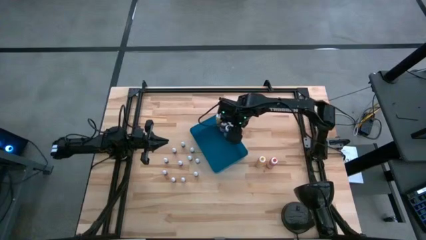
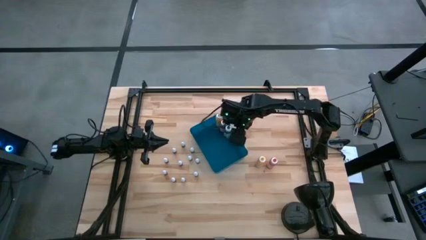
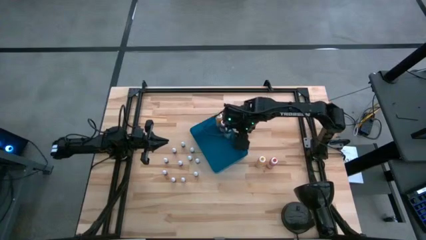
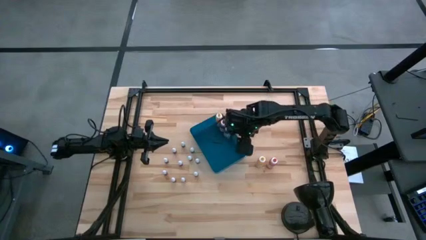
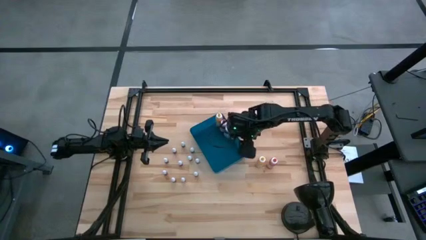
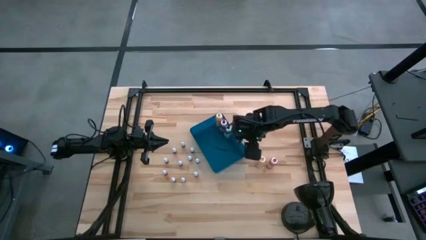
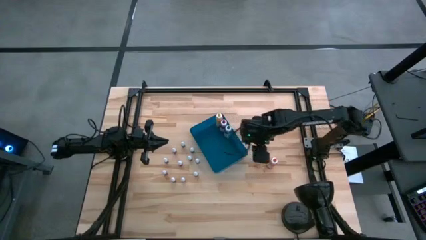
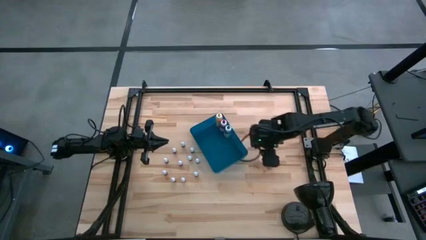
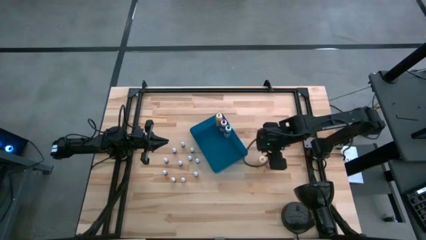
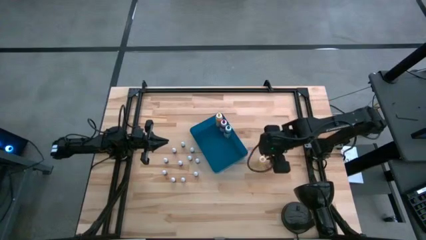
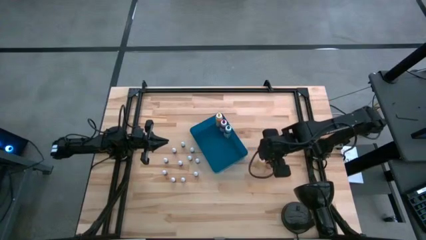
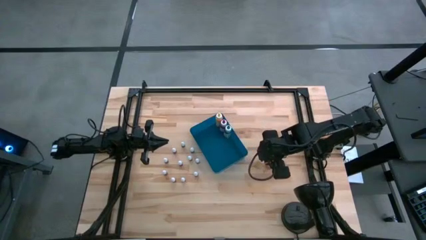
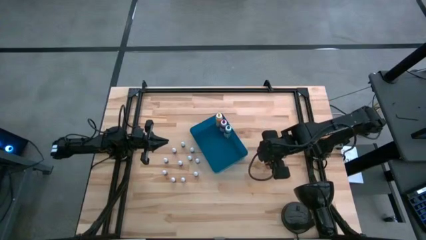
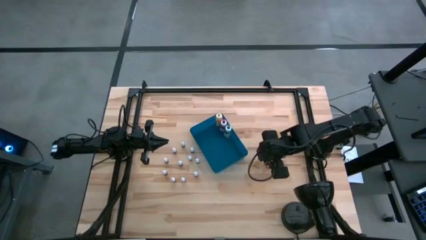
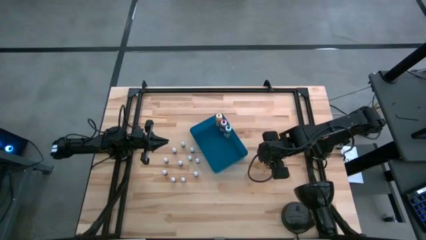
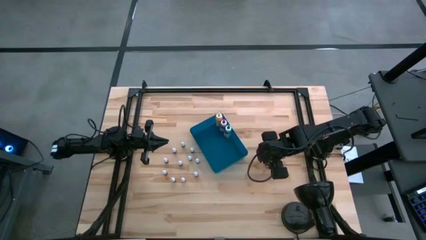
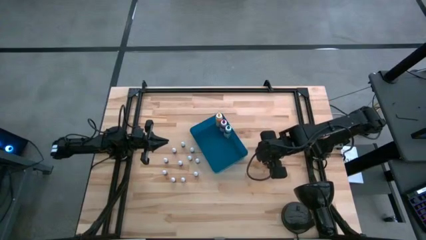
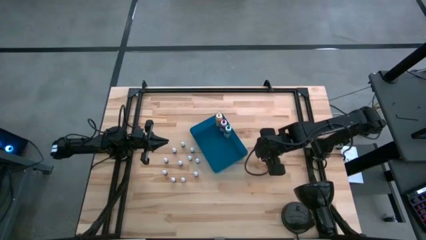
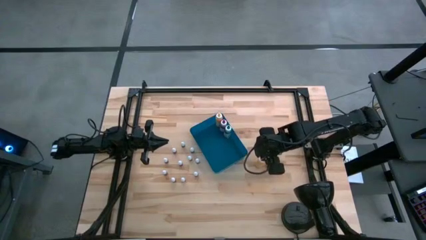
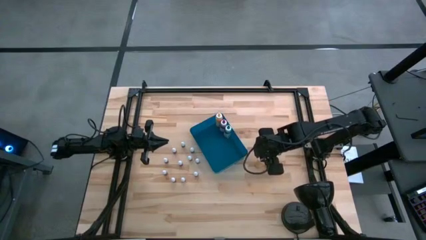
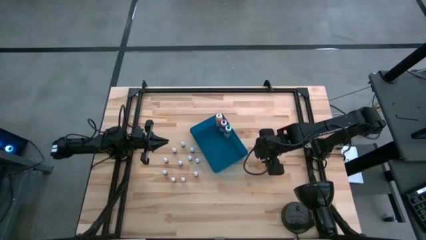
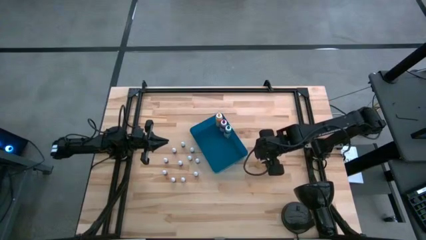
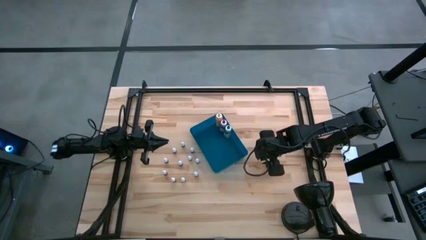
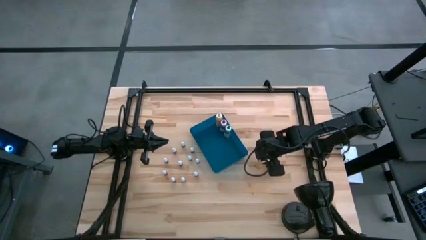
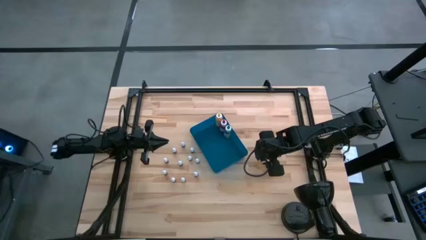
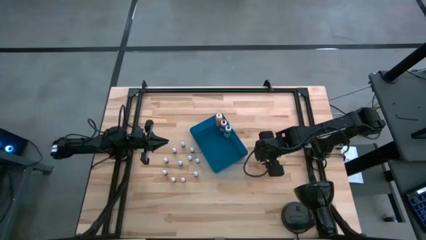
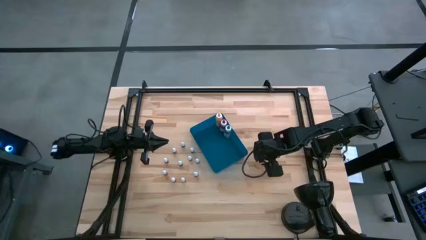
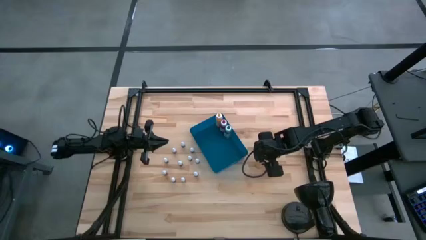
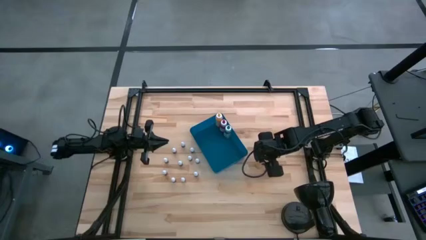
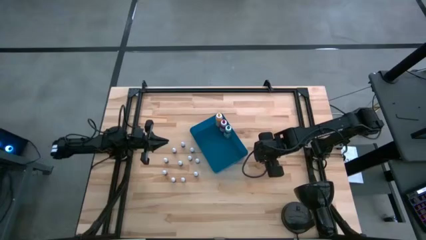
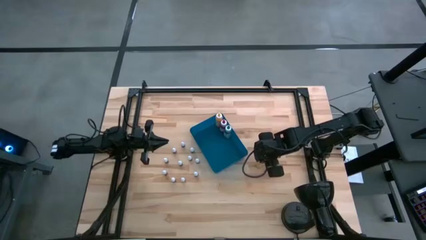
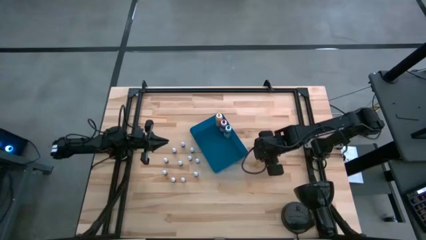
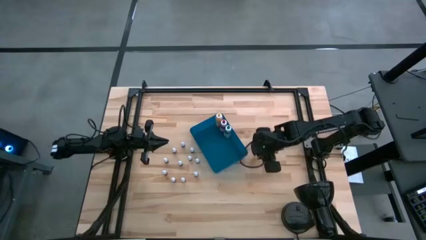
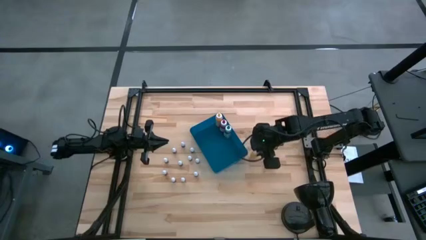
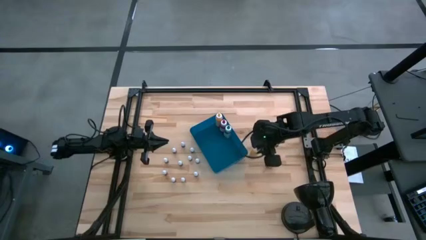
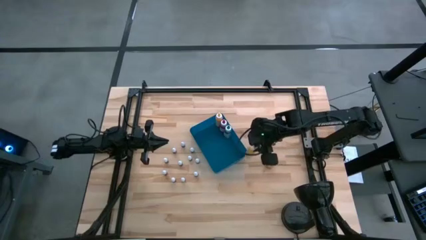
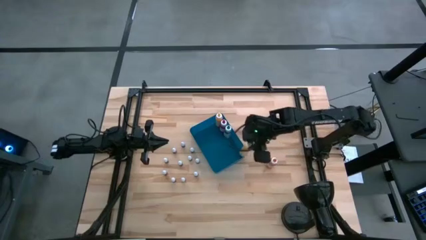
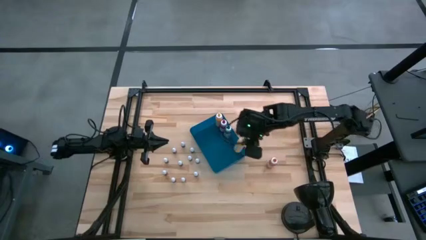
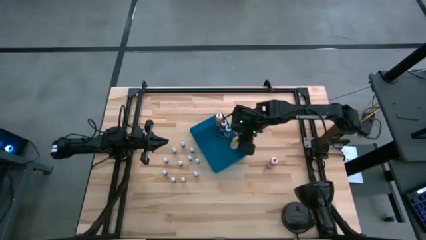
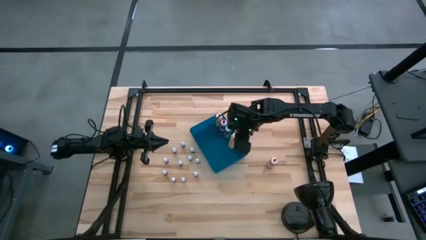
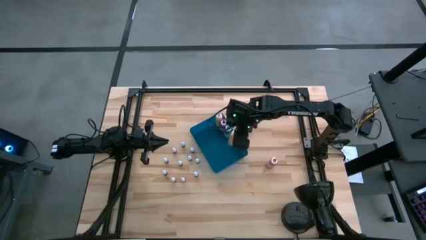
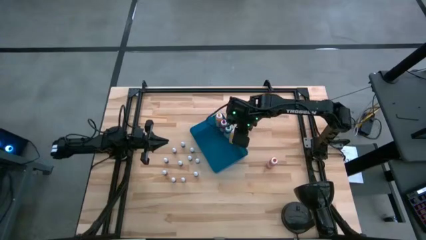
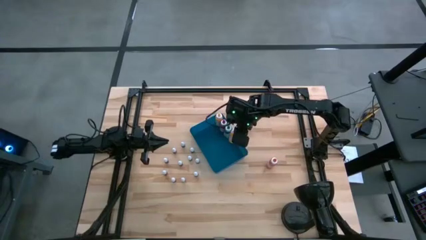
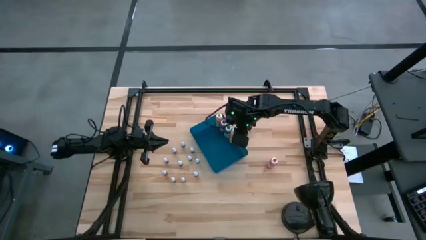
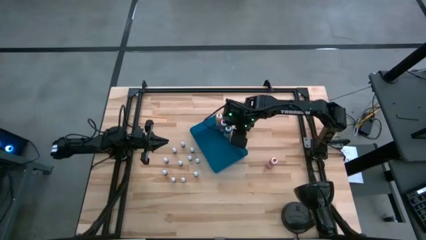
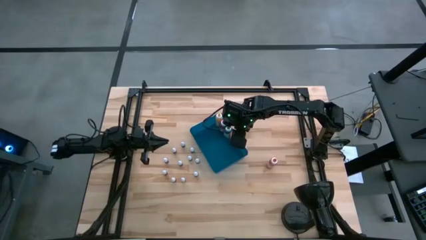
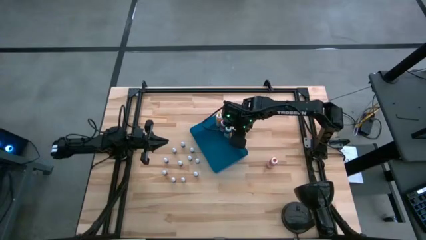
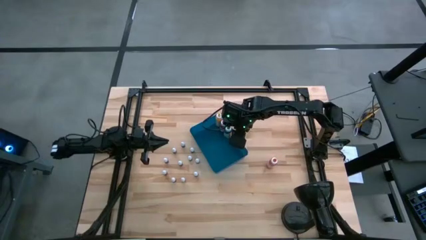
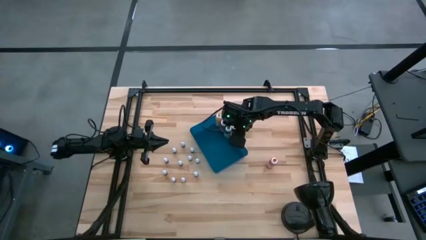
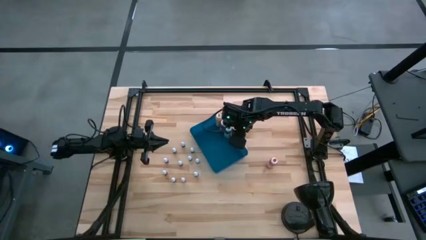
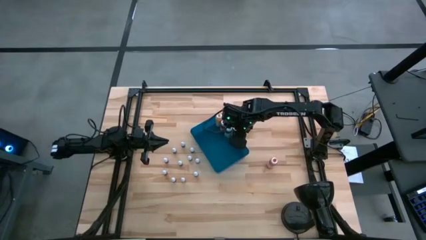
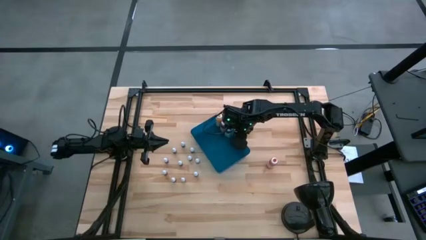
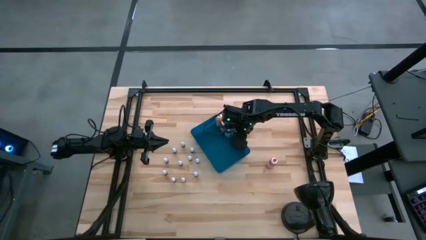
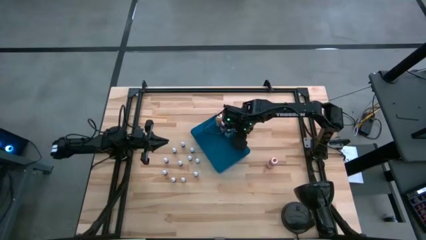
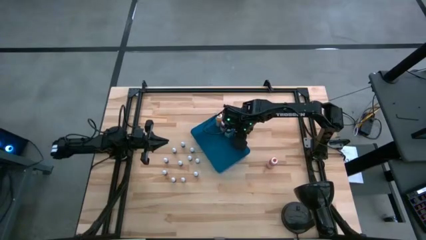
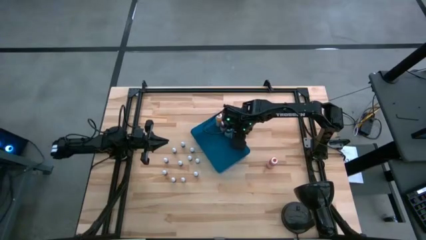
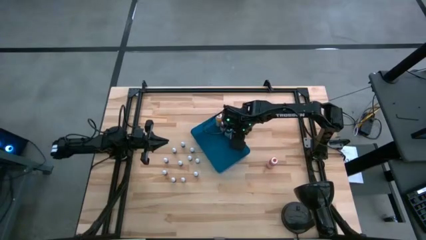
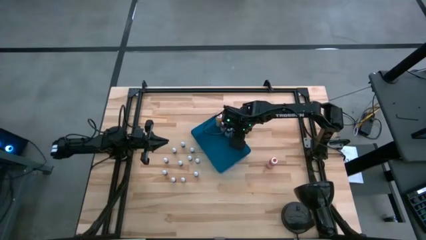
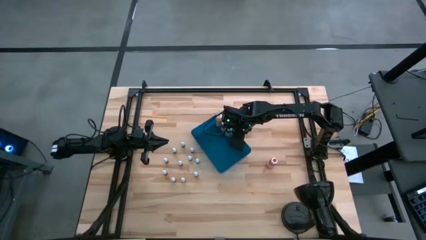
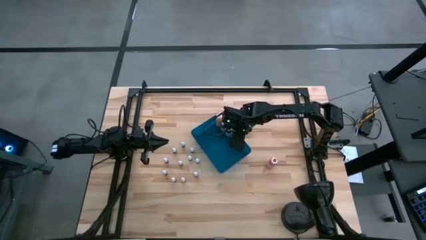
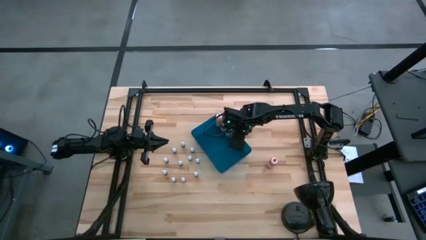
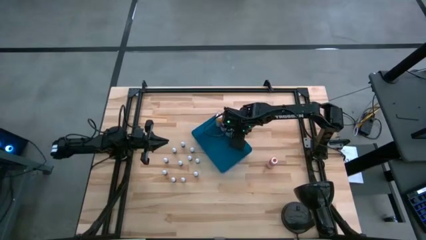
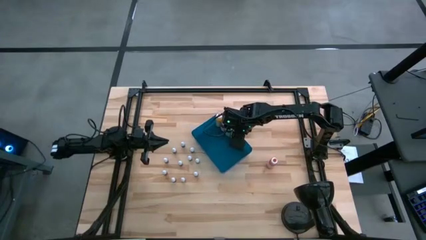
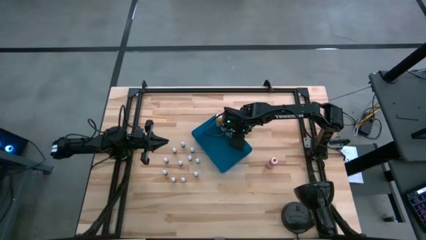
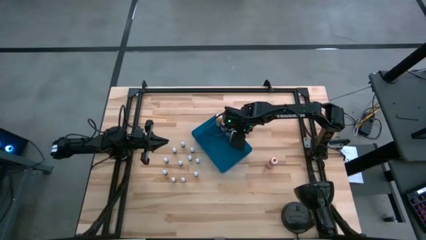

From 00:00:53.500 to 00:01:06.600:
Task: Pick & Place food coloring
Put the yellow food coloring bottle into the blue bin

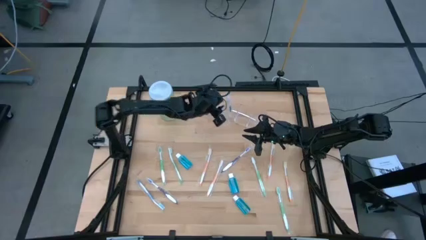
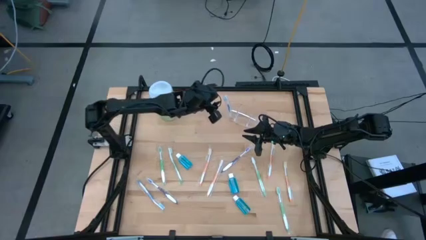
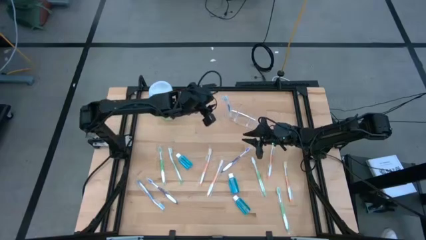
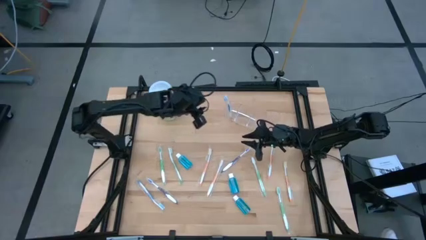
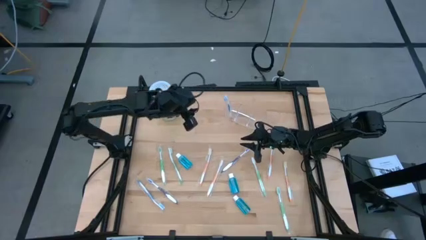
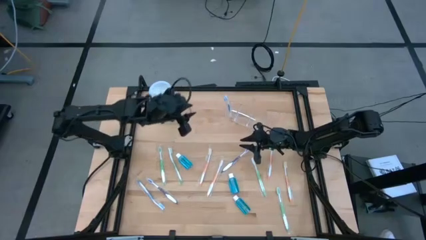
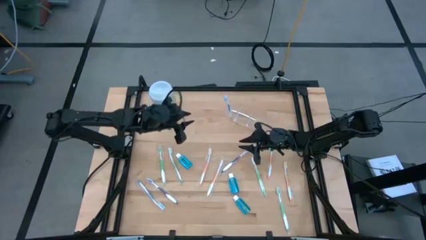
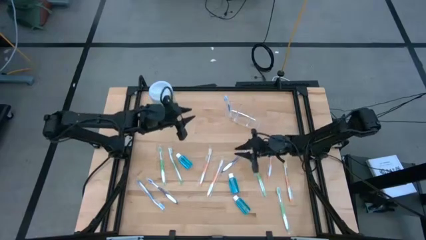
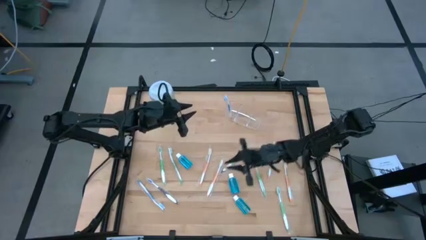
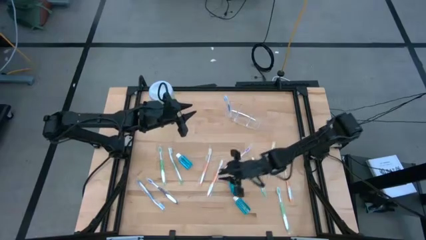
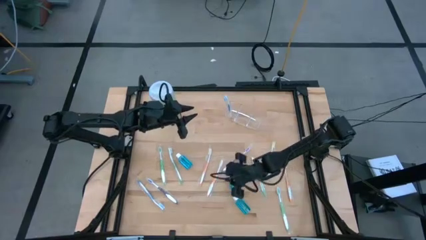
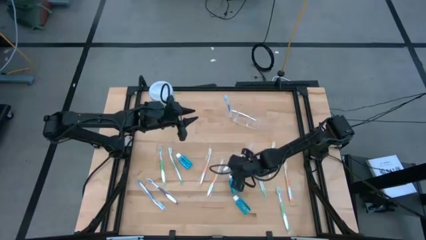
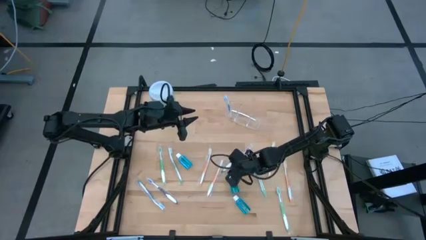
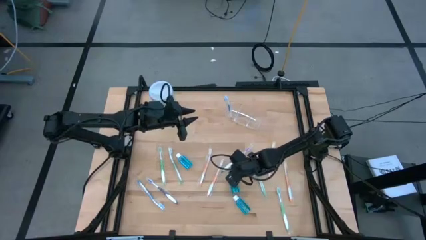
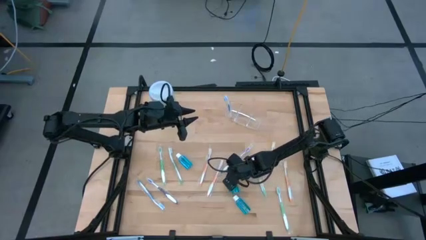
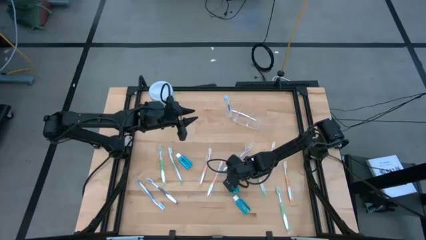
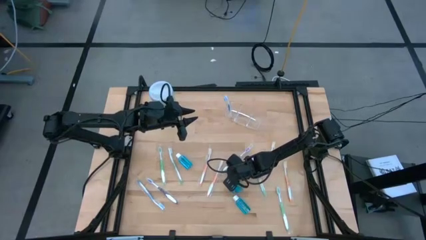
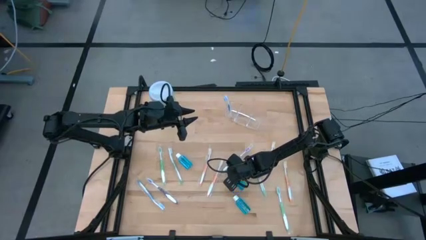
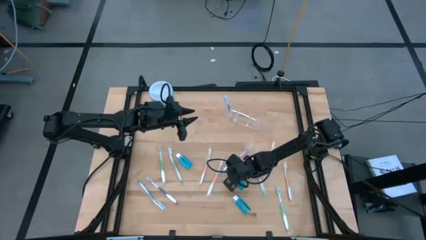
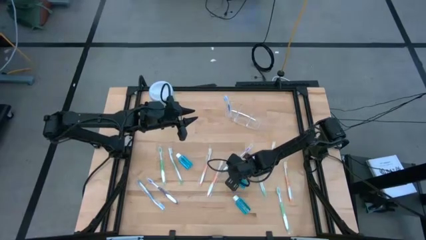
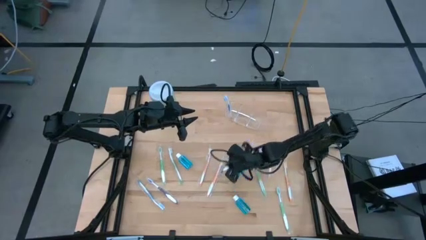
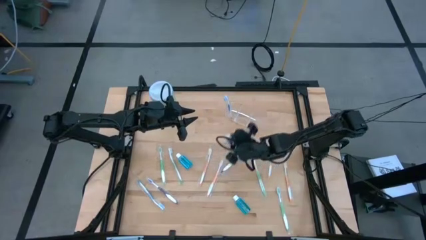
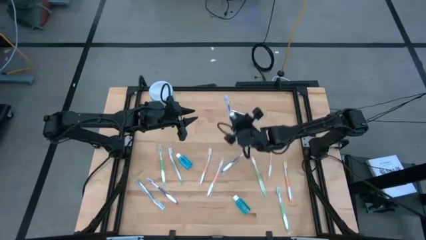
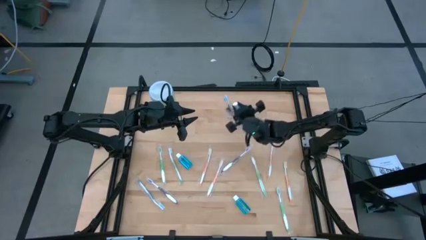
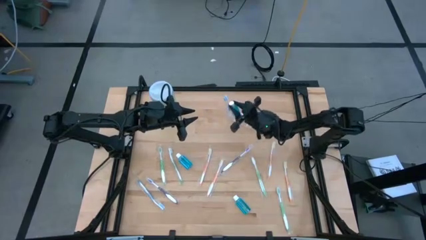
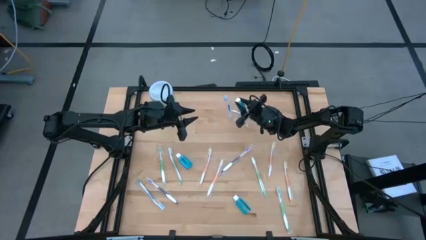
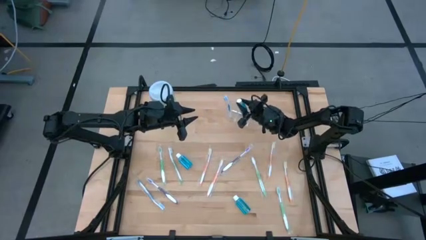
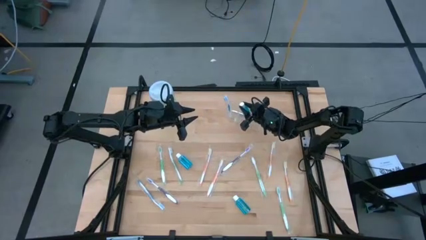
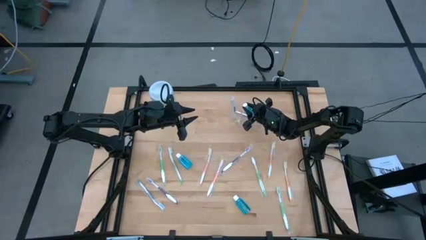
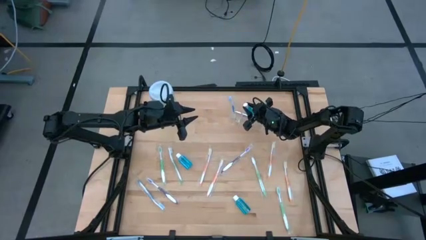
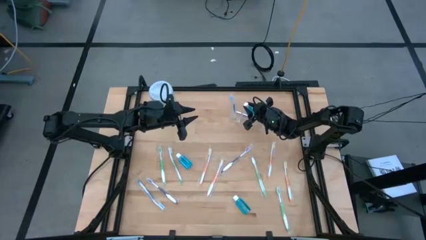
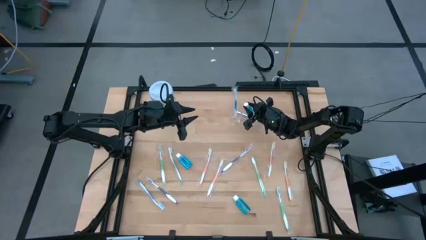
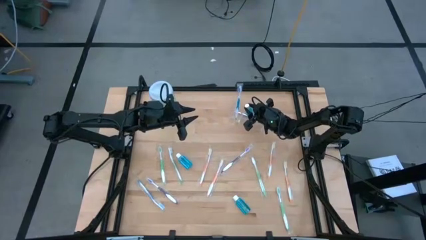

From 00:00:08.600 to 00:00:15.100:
Task: Pick & Place toothbrushing station
Put the middle blue mouthwash into the transparent organizer
